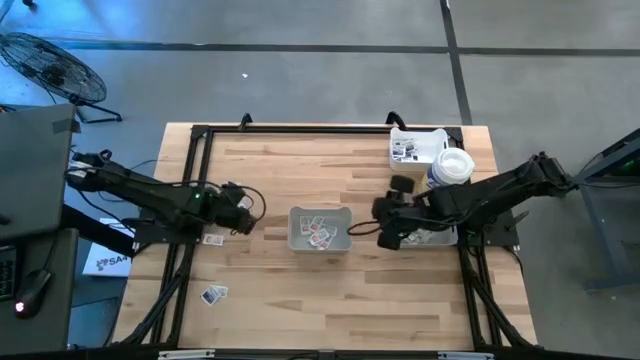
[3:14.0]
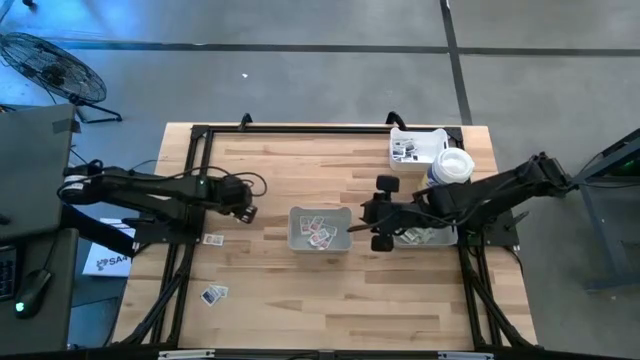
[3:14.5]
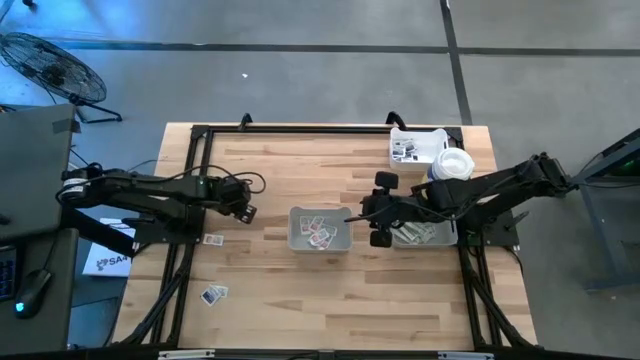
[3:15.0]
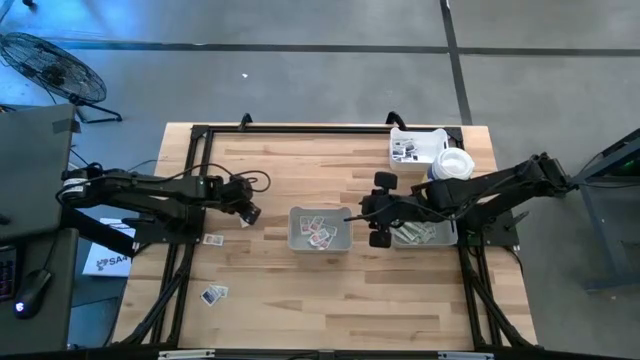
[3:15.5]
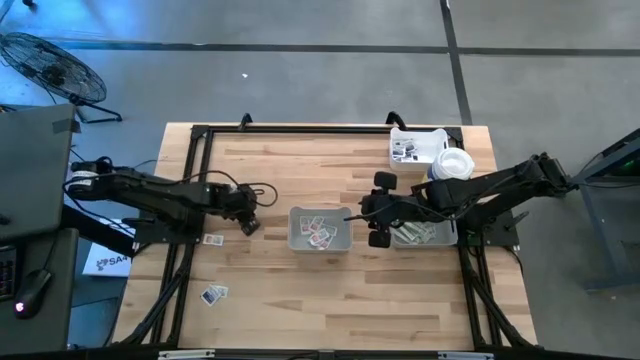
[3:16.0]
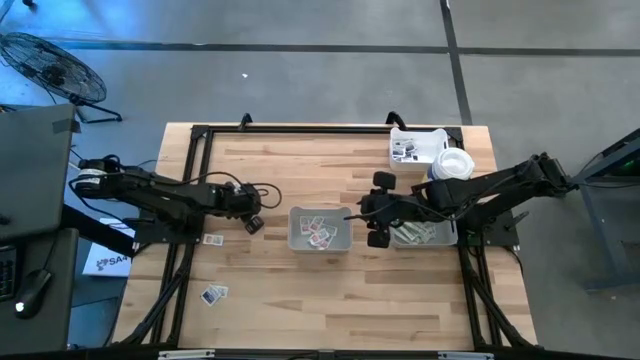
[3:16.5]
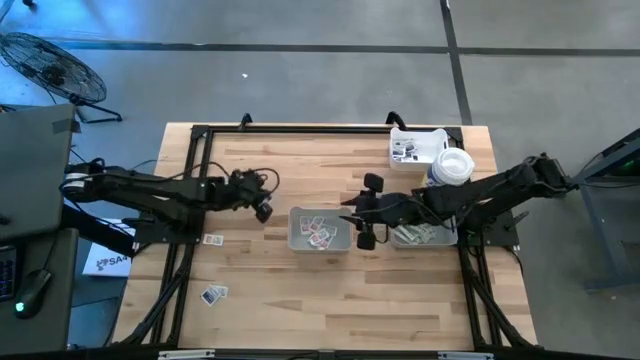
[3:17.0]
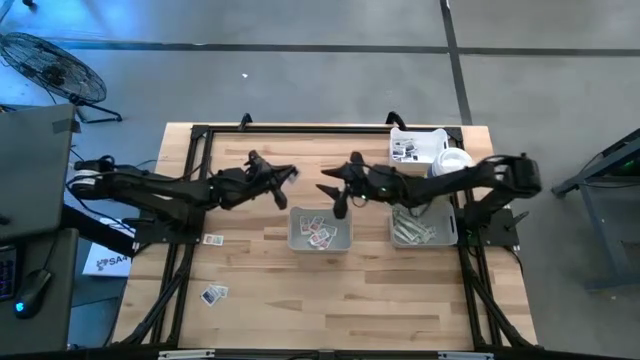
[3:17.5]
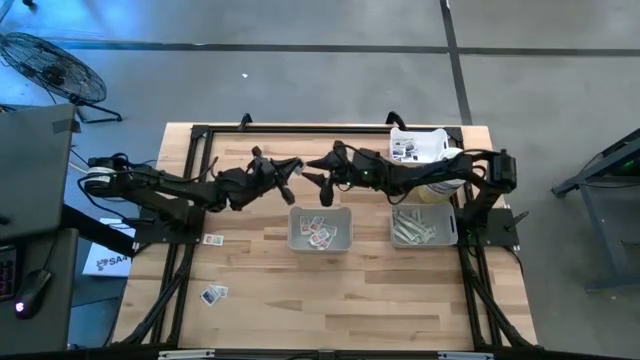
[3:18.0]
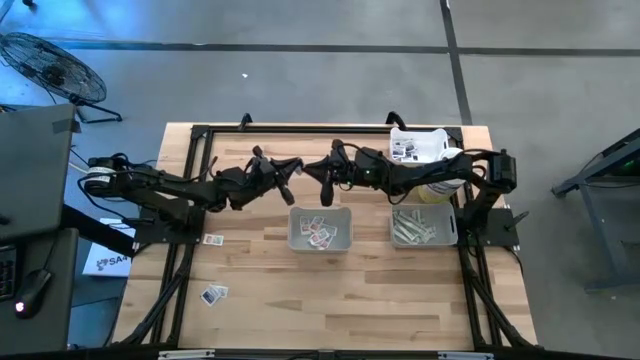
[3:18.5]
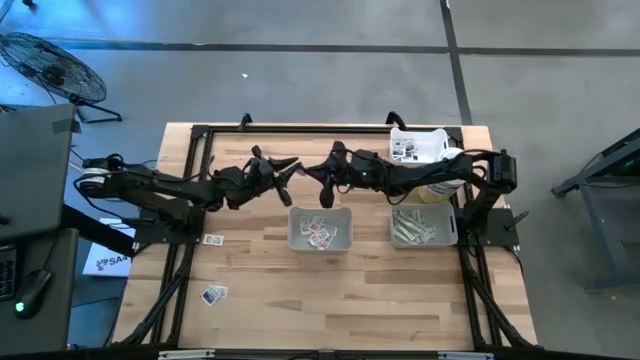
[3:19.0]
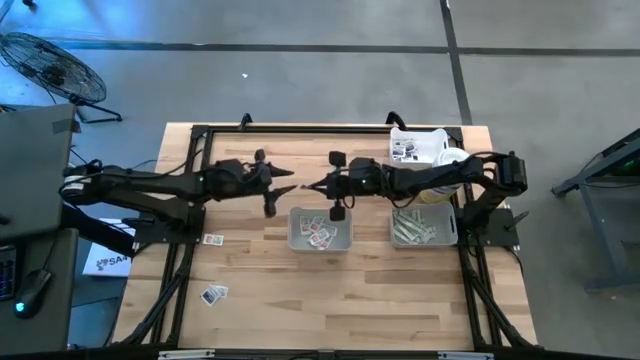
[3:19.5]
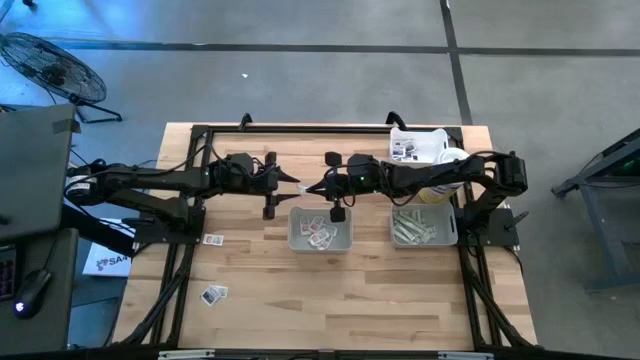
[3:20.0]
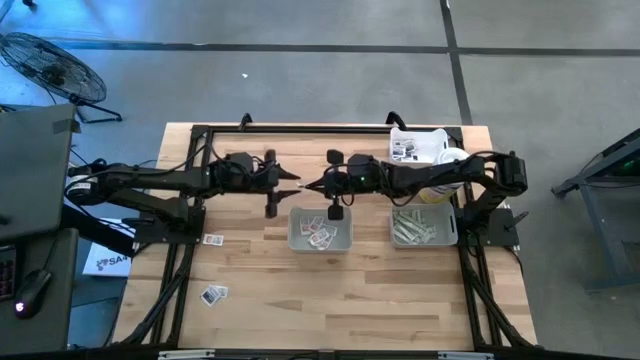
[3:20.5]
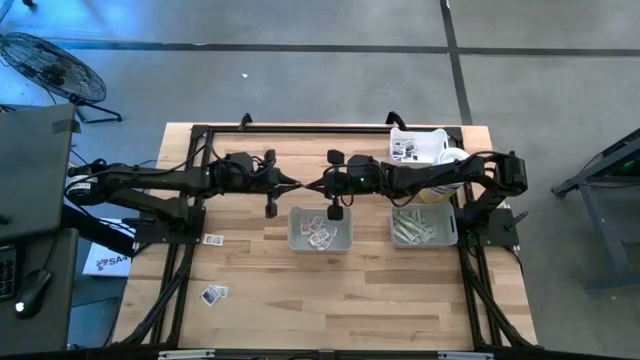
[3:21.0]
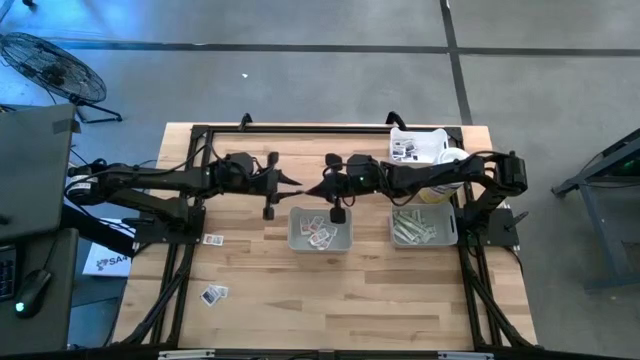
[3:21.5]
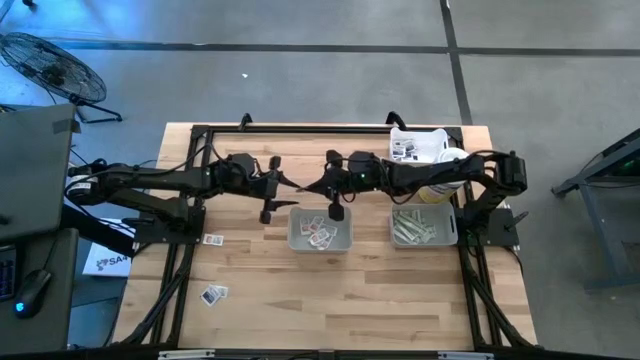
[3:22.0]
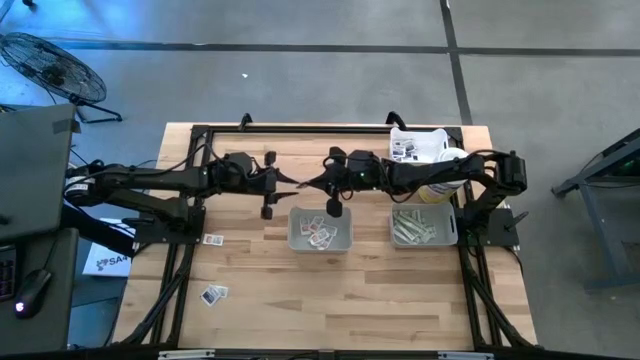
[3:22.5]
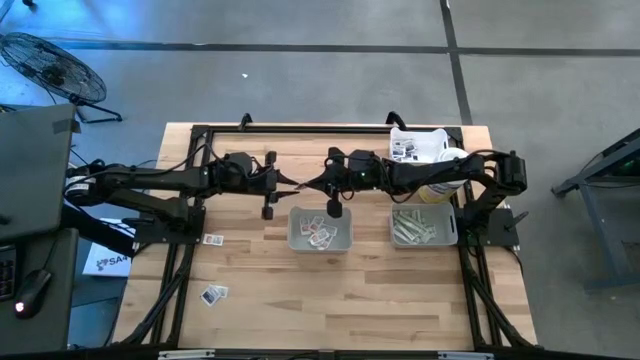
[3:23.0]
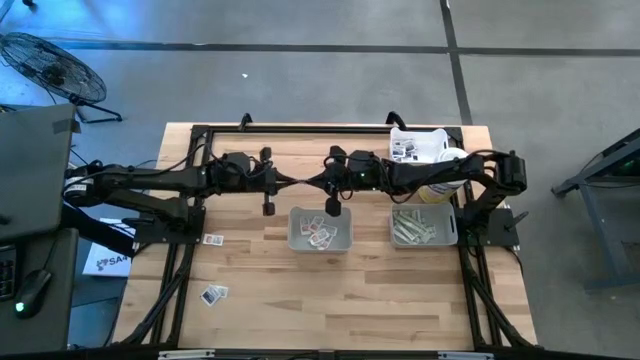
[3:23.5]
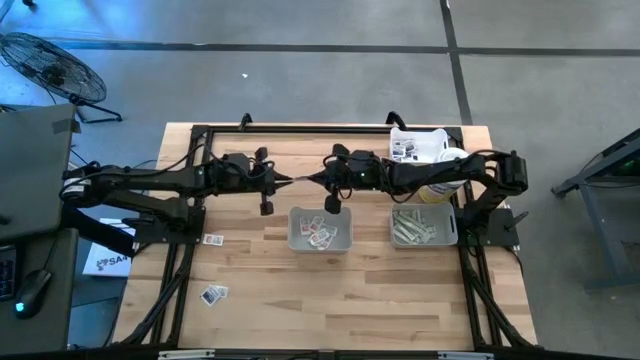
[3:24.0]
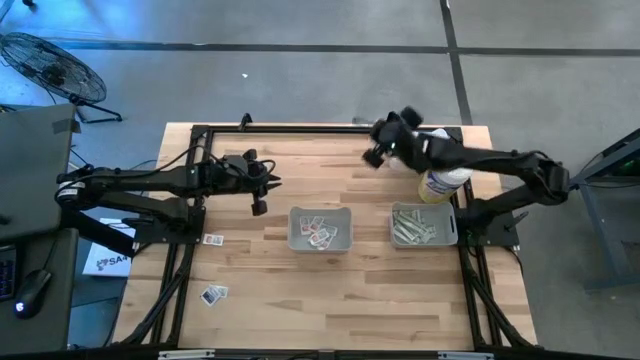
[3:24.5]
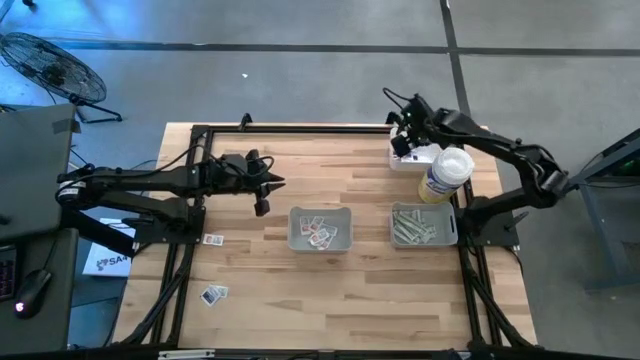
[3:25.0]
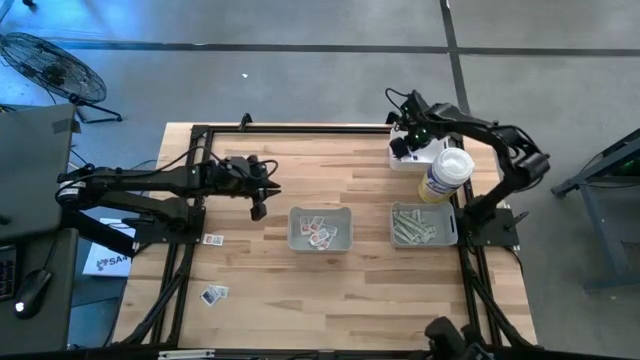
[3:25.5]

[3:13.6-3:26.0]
Task: Pick & Place First Aid Supplies
Put the blue pad into the white bin

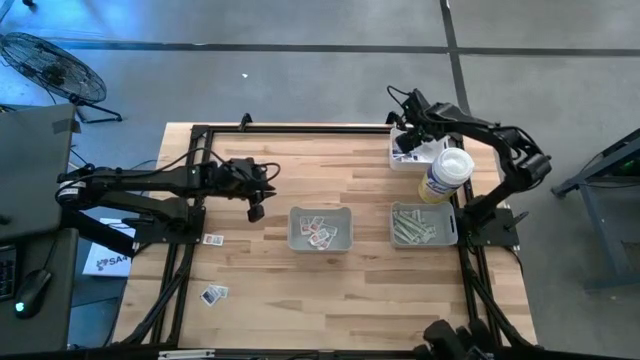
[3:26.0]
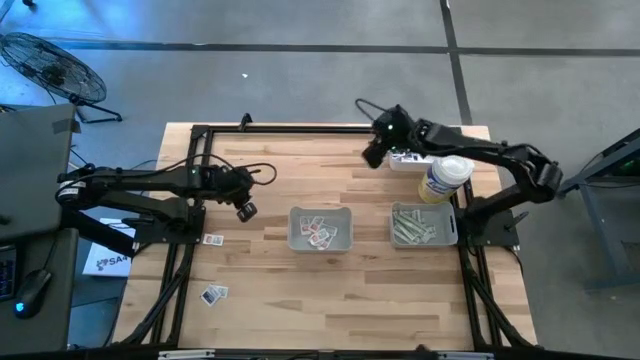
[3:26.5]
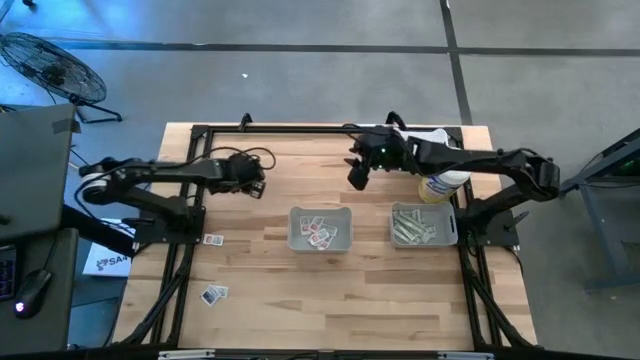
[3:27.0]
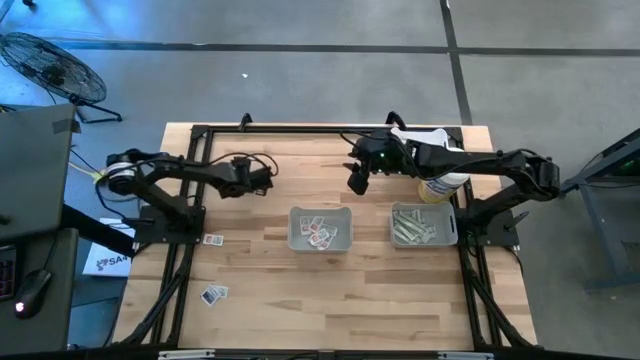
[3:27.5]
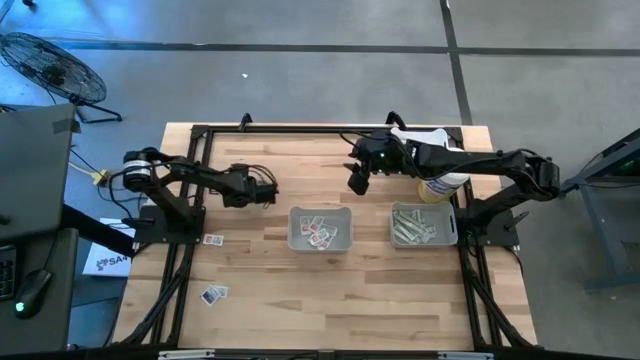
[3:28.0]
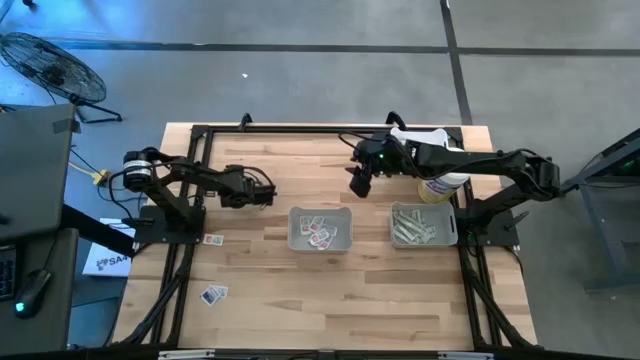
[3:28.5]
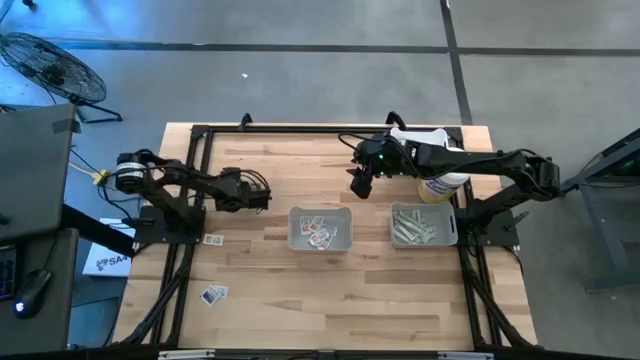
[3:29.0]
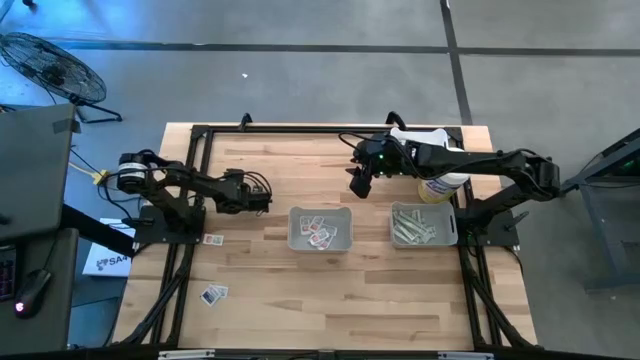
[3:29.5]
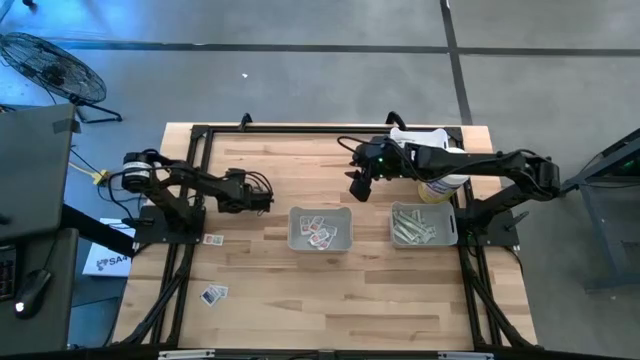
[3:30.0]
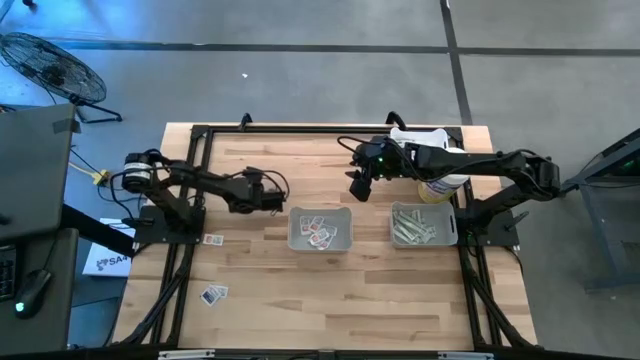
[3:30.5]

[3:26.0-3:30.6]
Put the orange pad into the left gray bin

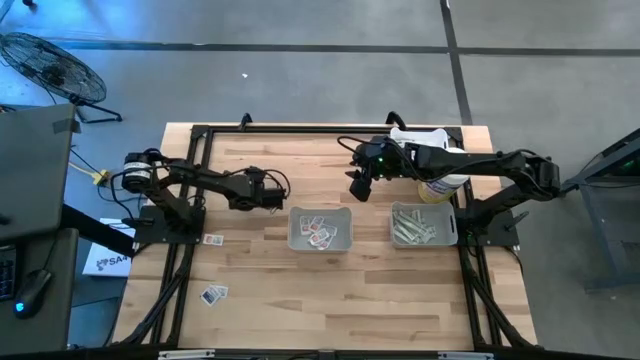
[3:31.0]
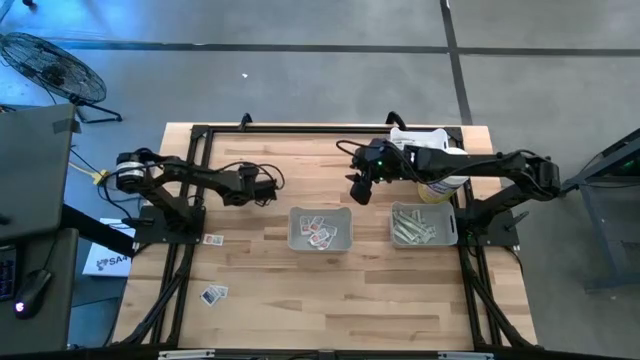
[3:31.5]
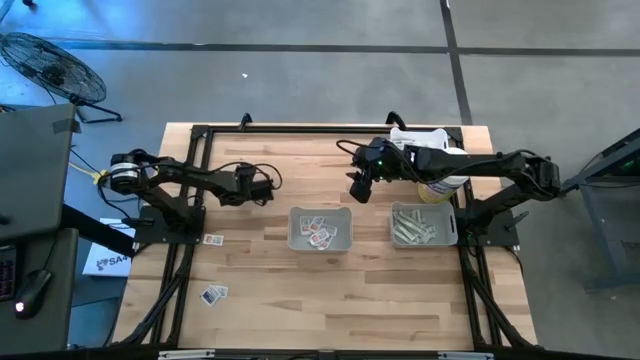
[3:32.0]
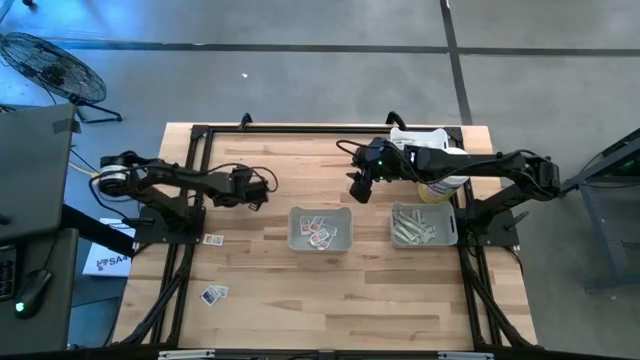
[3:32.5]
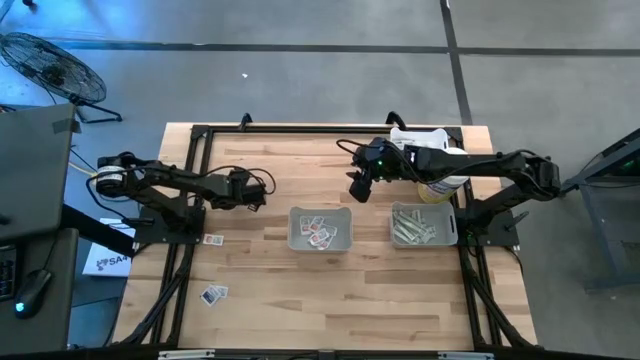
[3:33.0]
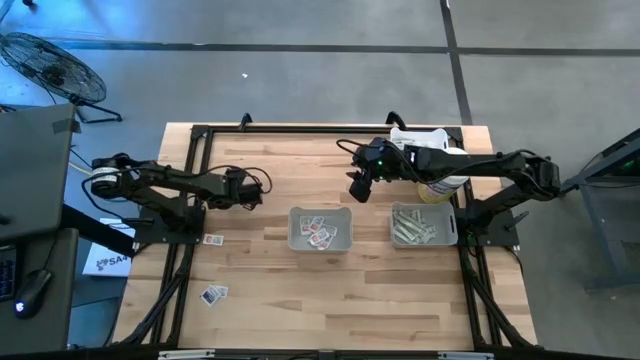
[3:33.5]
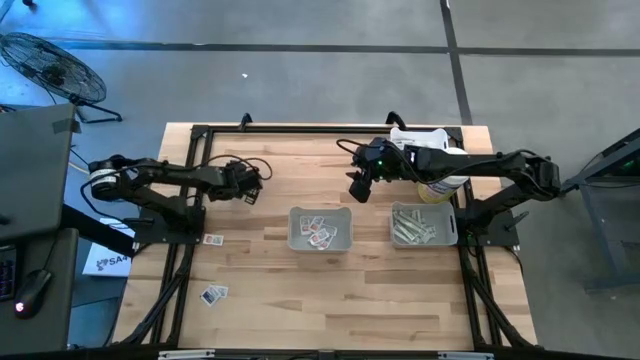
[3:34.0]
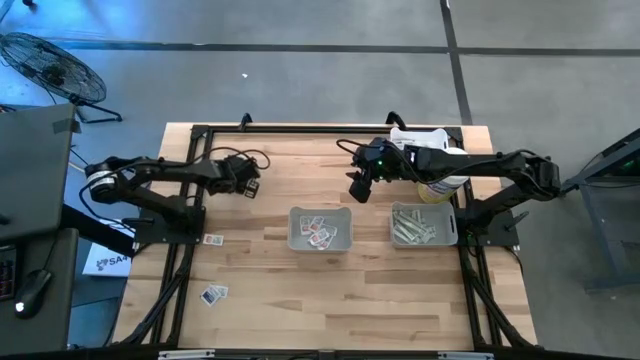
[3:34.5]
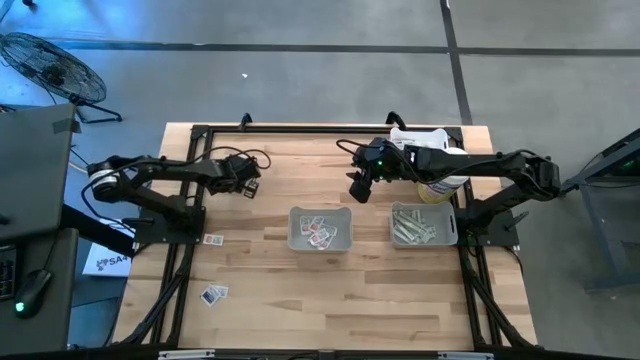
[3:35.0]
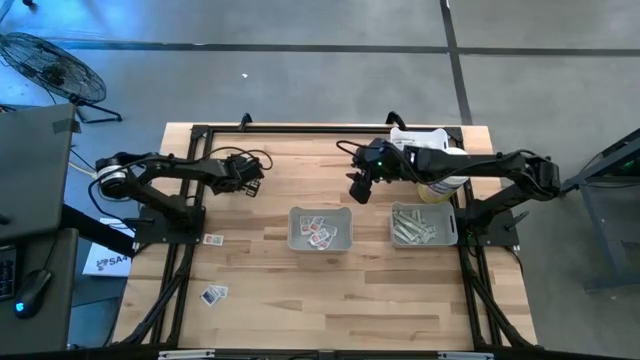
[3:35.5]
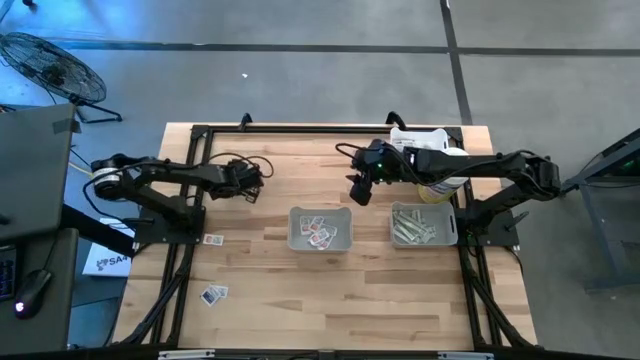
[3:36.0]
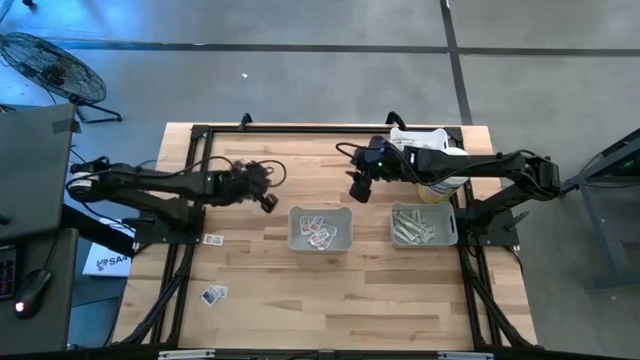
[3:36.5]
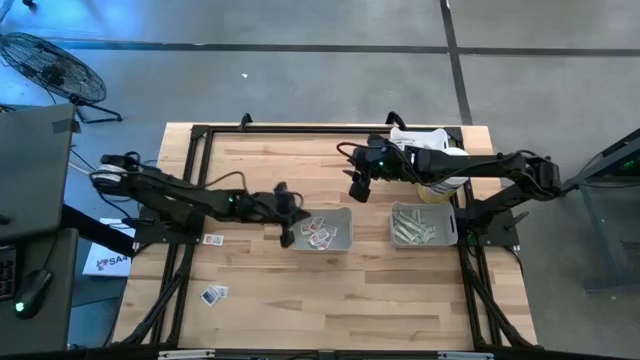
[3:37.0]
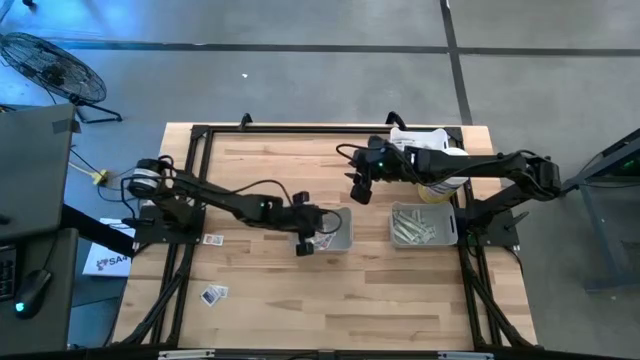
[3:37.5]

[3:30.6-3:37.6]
Put the orange pad into the left gray bin
